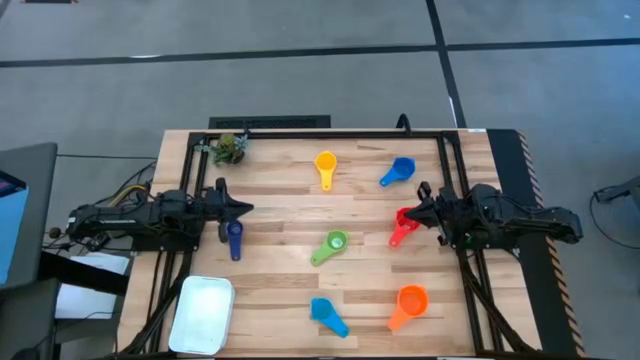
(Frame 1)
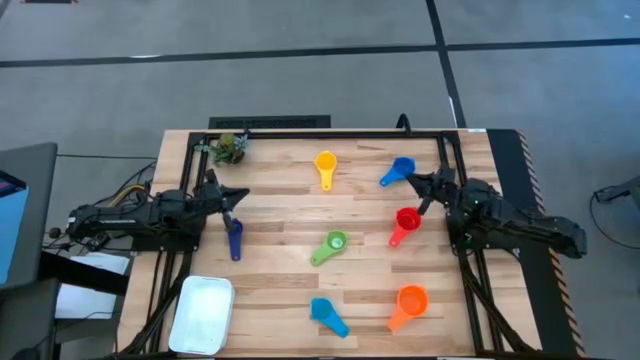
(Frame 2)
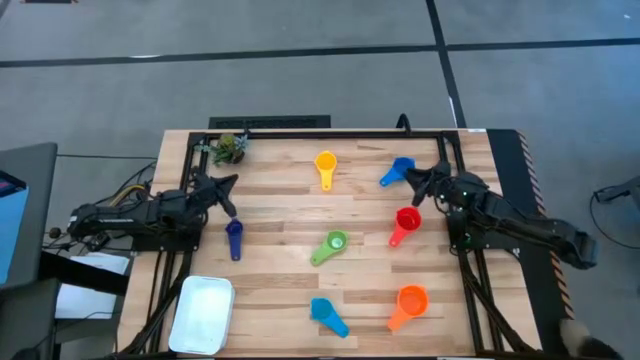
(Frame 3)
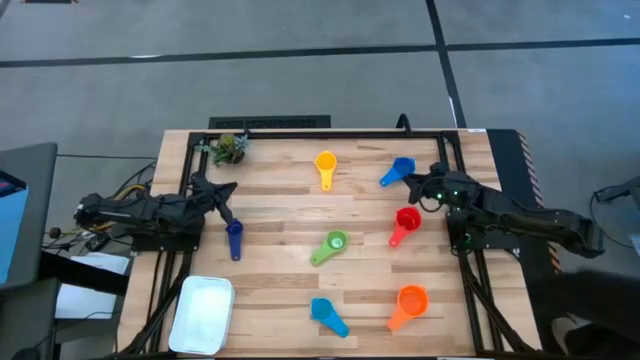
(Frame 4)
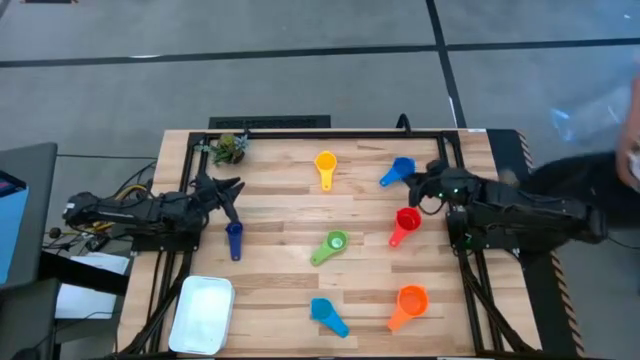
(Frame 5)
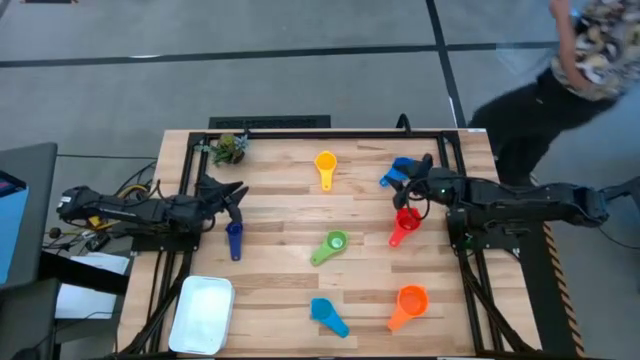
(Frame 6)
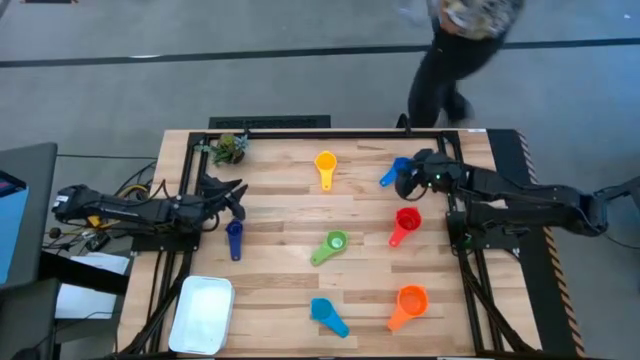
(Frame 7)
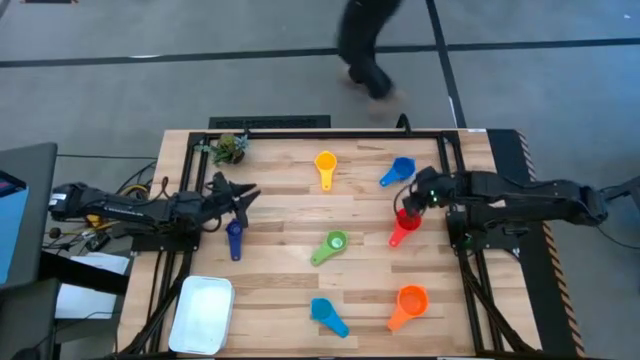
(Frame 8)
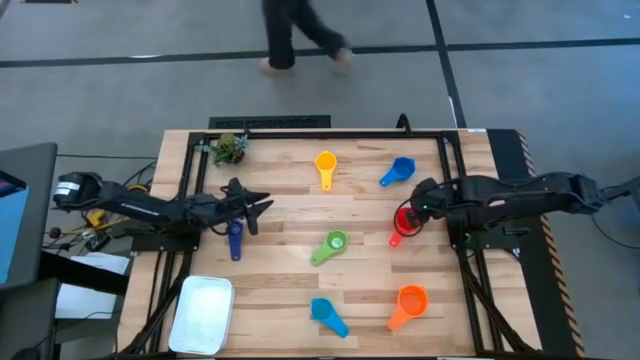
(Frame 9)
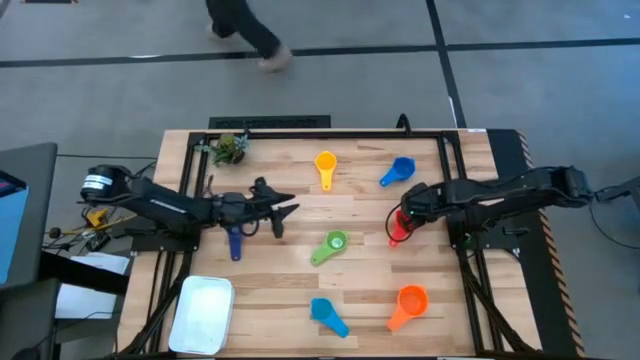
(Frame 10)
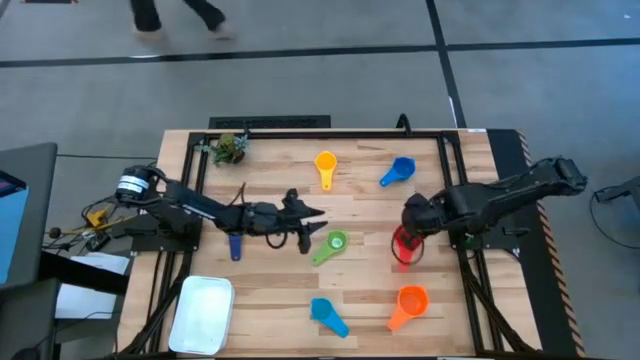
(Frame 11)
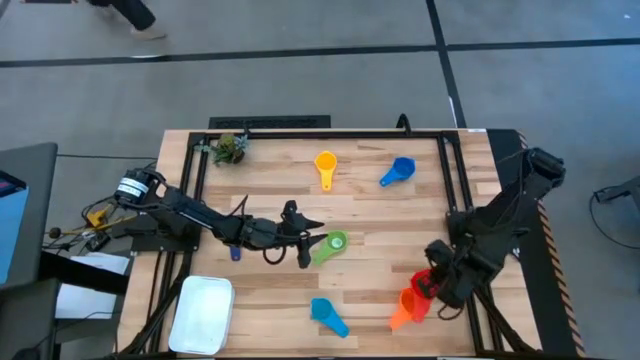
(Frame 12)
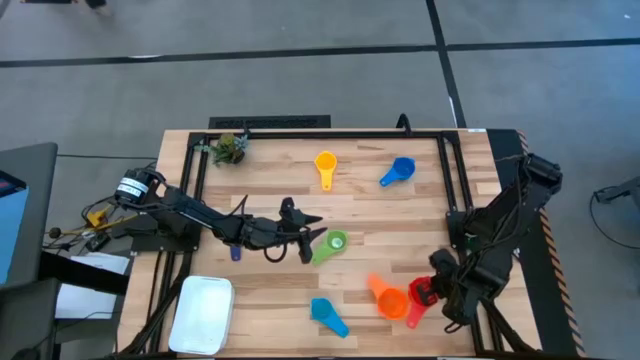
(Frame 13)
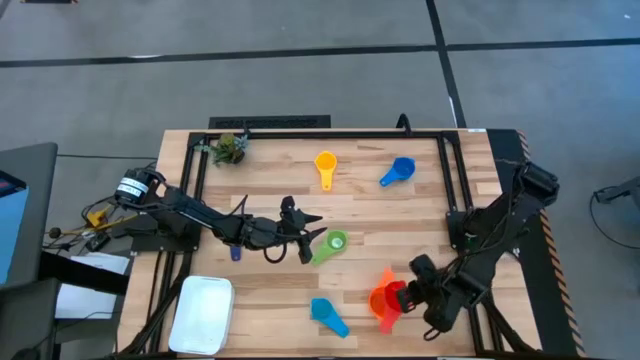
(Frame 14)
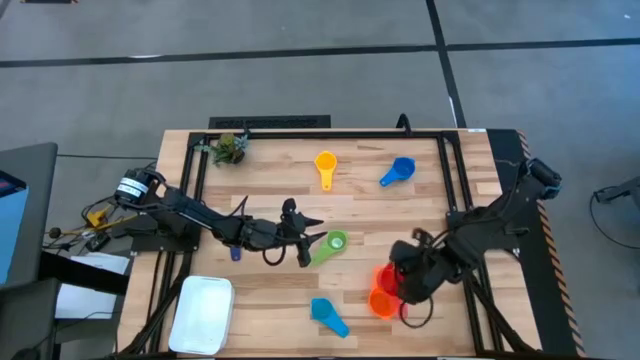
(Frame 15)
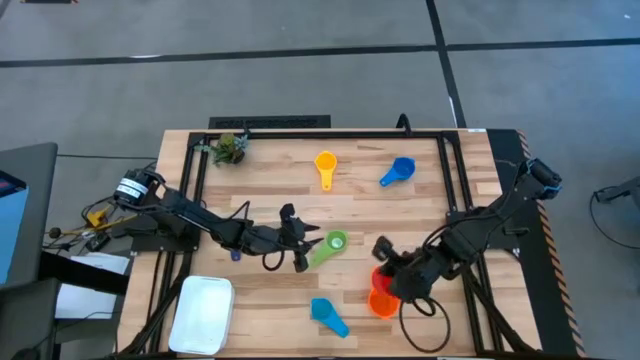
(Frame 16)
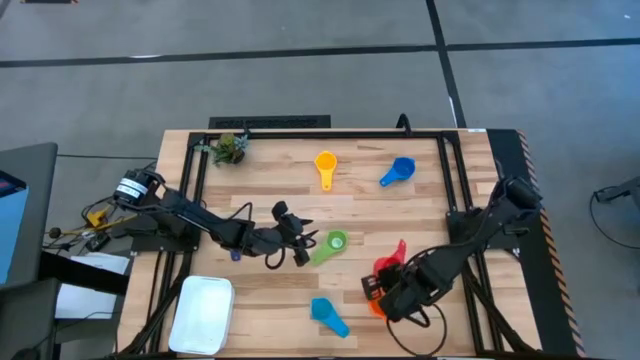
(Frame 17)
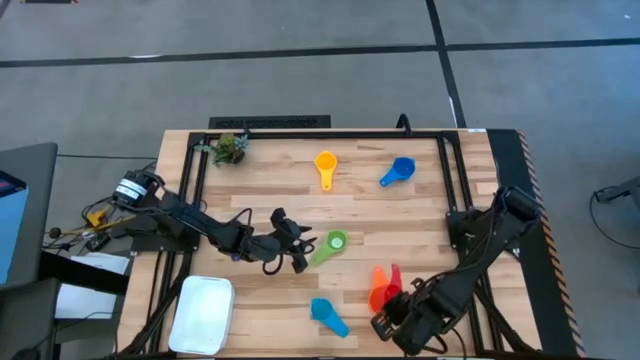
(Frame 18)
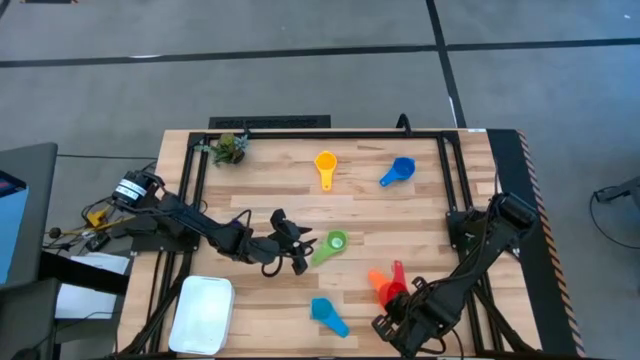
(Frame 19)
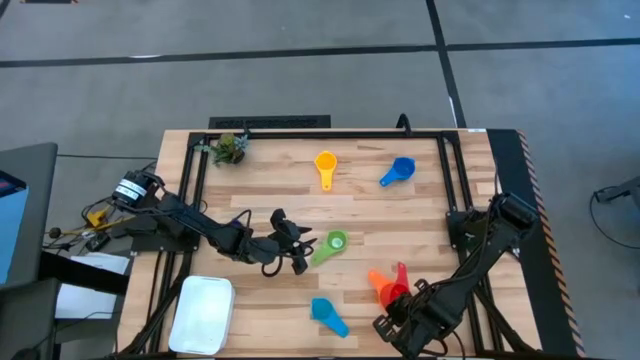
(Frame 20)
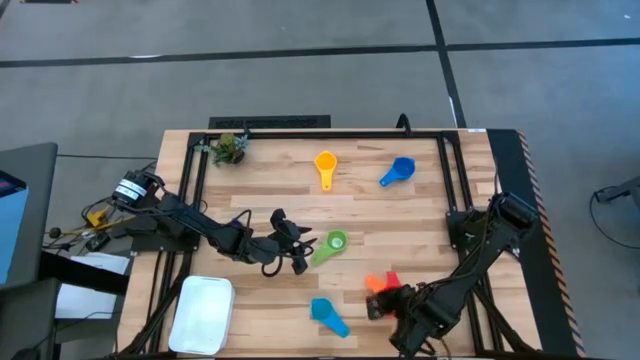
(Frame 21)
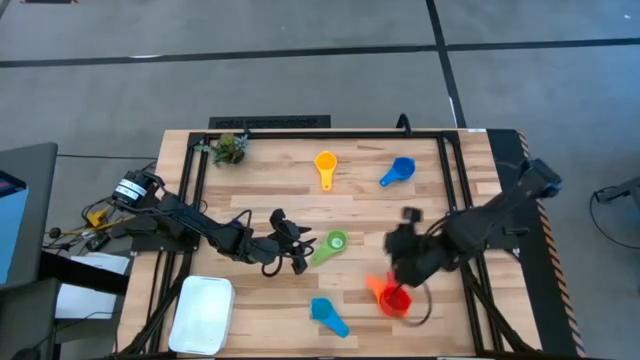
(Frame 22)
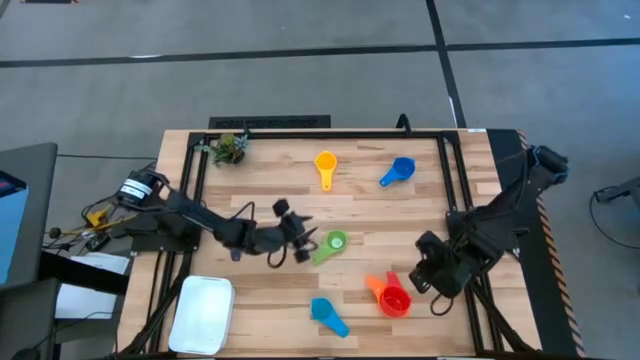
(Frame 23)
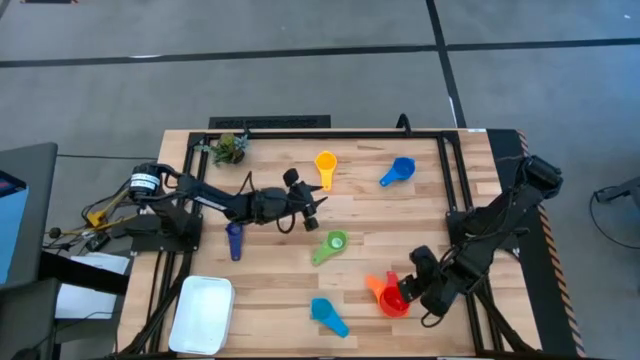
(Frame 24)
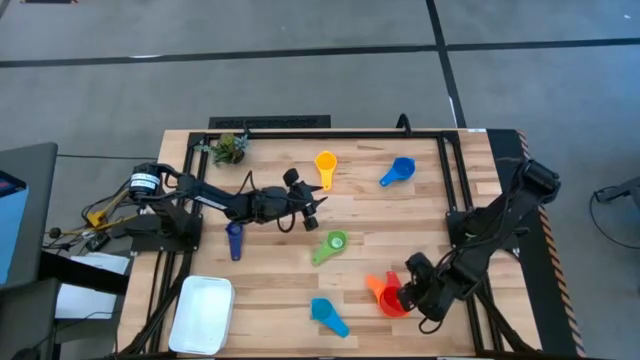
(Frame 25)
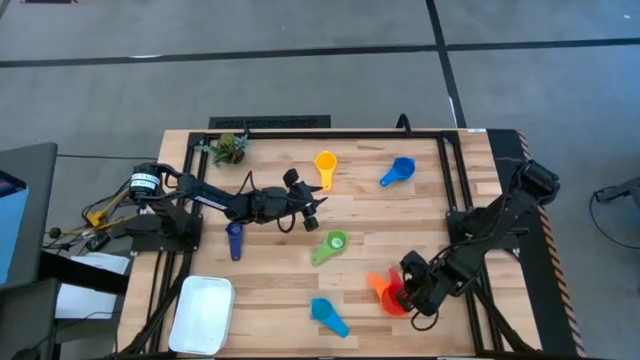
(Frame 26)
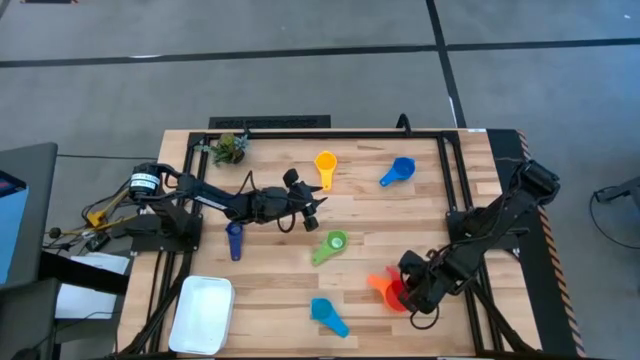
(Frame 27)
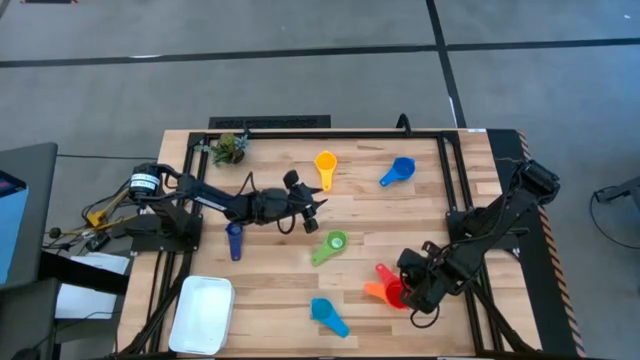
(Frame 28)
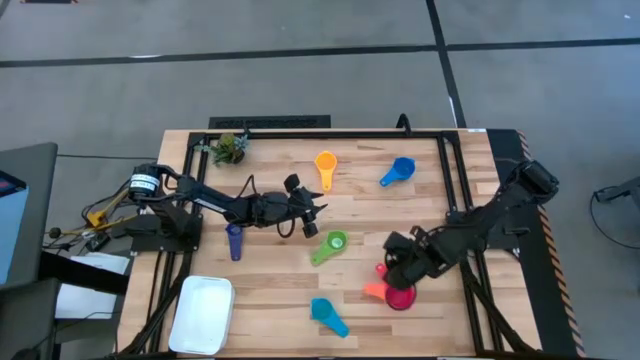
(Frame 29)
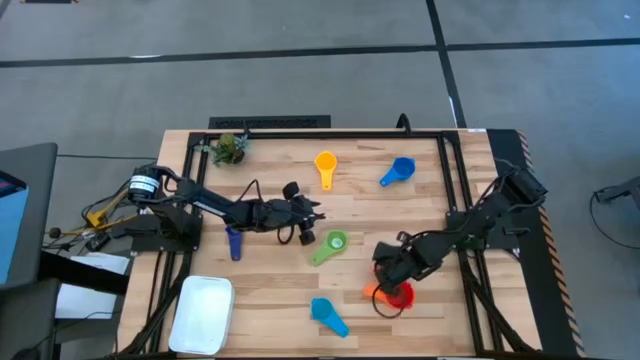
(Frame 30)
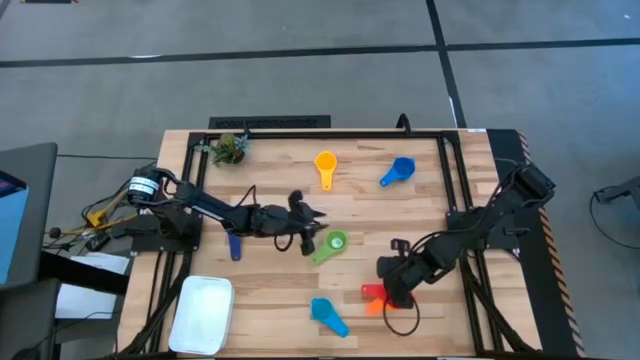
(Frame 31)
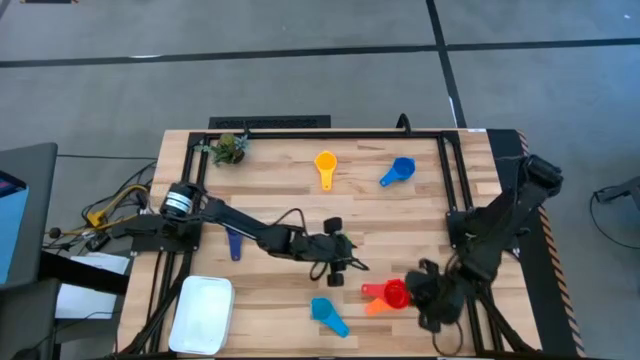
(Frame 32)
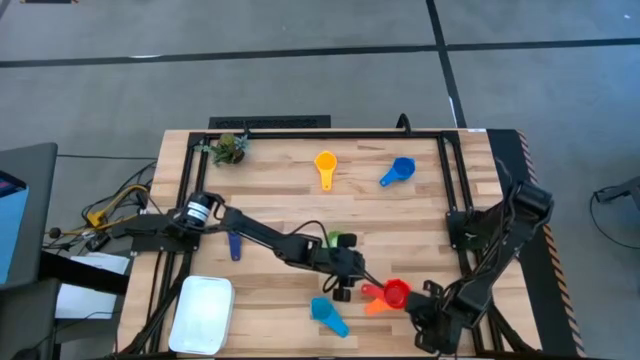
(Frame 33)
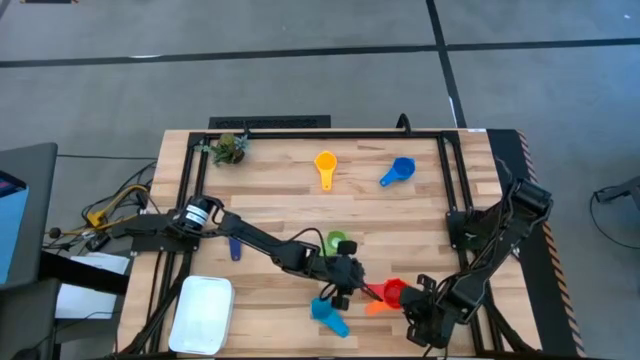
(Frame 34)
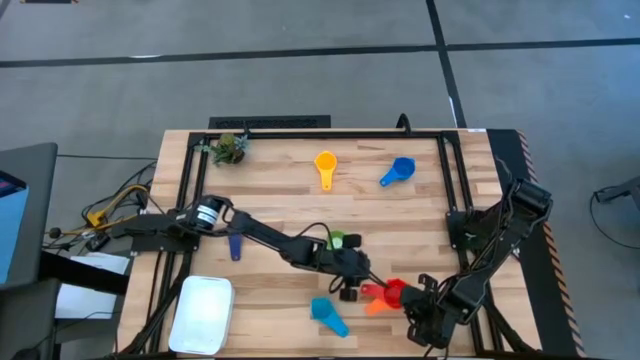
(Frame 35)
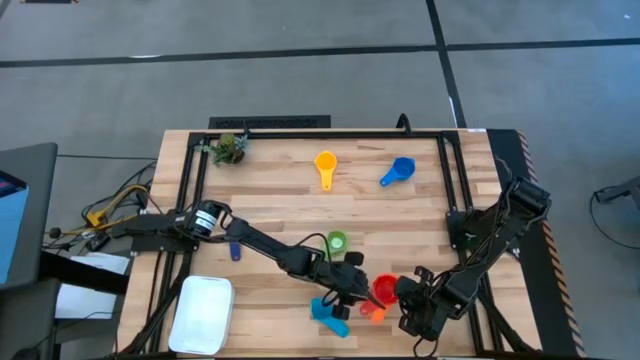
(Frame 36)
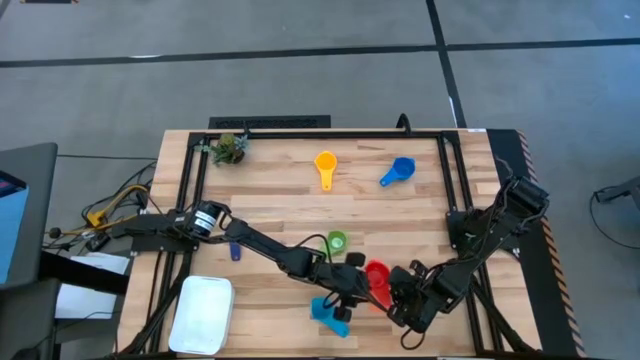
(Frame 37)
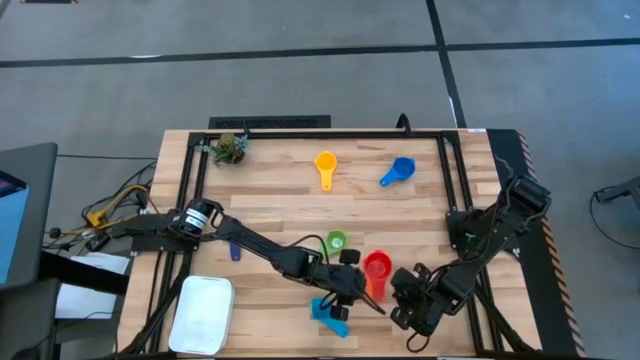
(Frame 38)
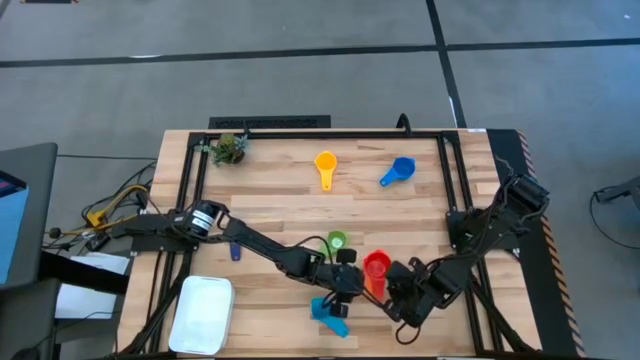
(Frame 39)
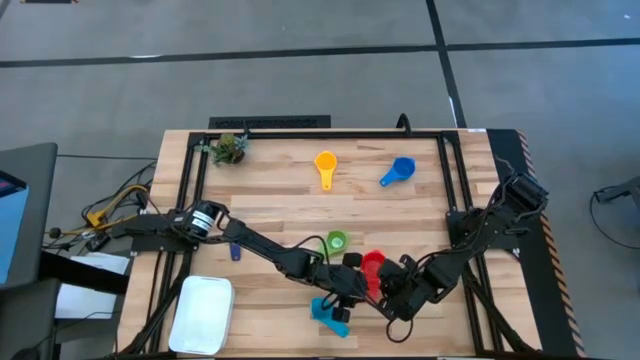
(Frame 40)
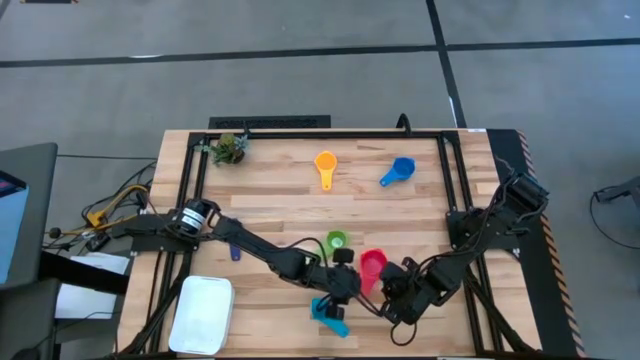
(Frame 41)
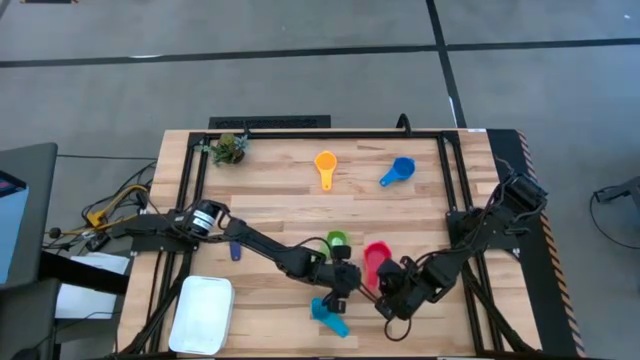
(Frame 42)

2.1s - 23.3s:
Task: Nest measuring cups in basket
Stack the red measuring cup on top of the orange measuring cup
